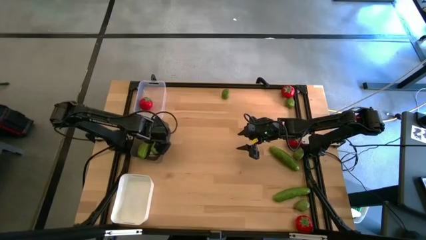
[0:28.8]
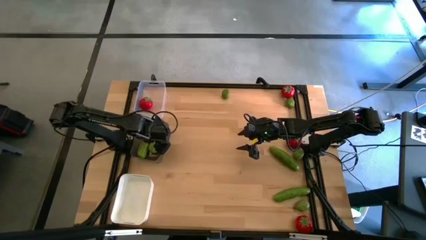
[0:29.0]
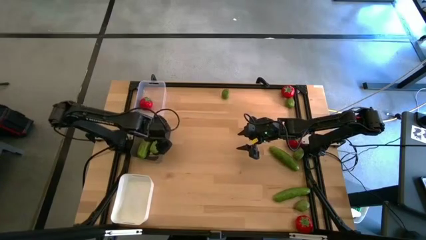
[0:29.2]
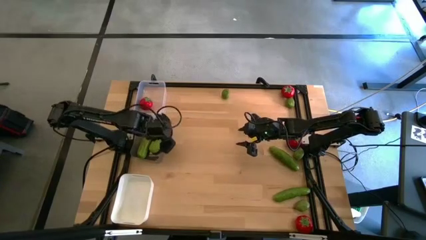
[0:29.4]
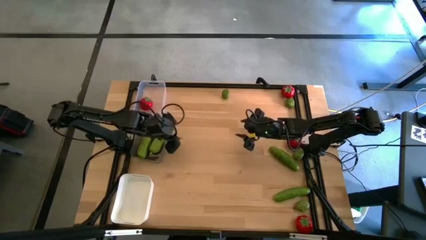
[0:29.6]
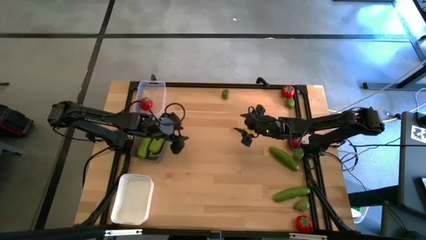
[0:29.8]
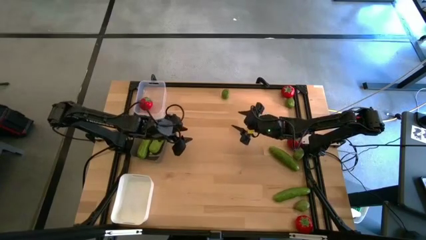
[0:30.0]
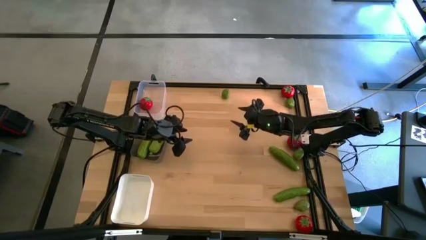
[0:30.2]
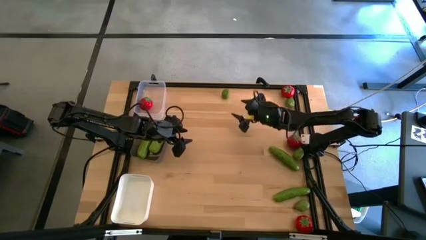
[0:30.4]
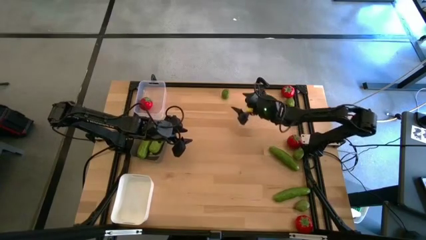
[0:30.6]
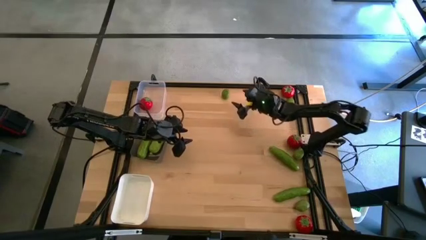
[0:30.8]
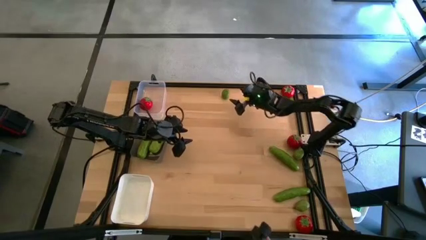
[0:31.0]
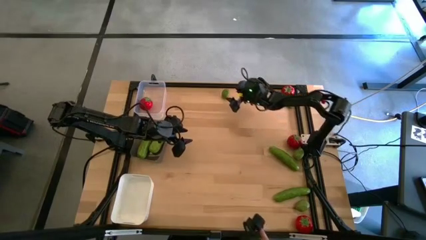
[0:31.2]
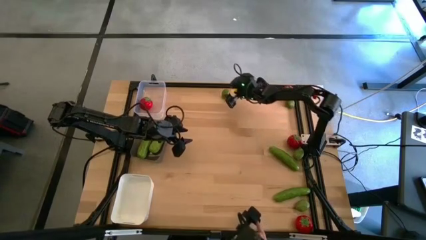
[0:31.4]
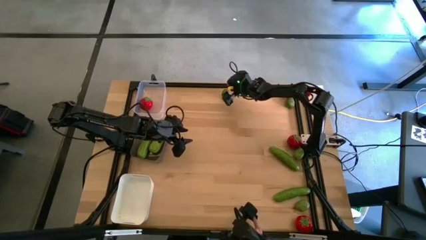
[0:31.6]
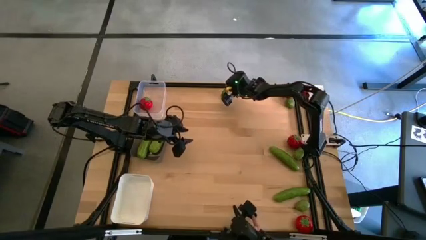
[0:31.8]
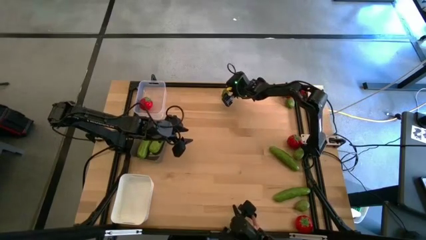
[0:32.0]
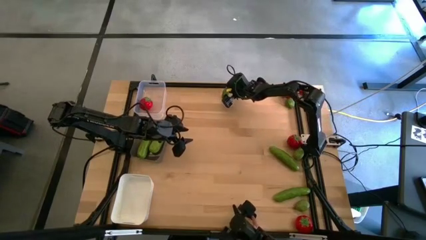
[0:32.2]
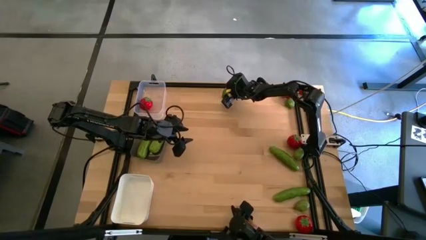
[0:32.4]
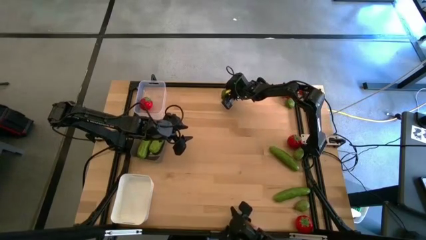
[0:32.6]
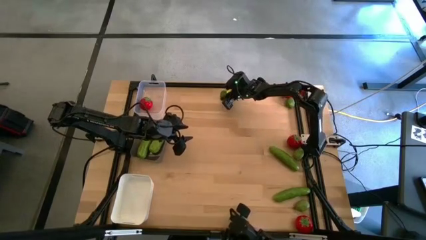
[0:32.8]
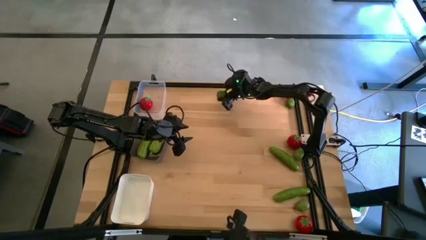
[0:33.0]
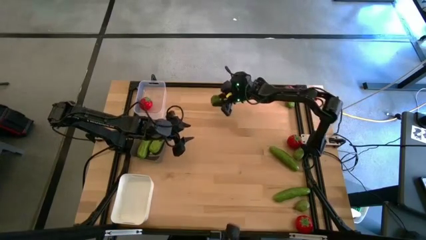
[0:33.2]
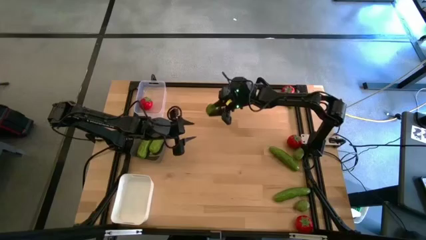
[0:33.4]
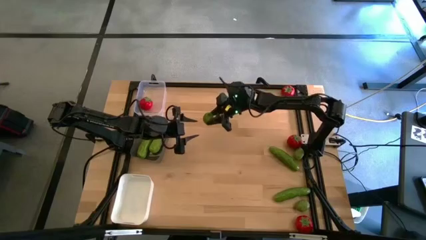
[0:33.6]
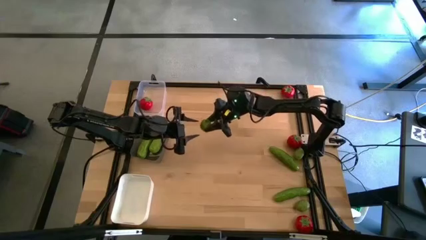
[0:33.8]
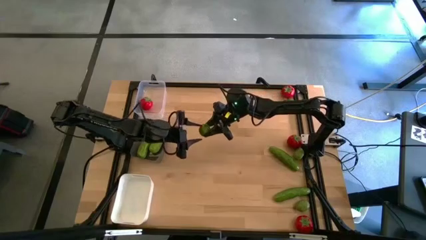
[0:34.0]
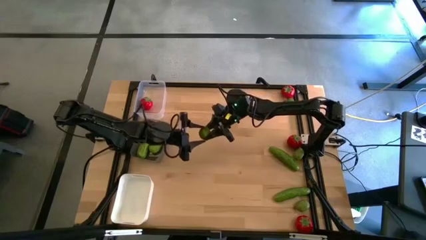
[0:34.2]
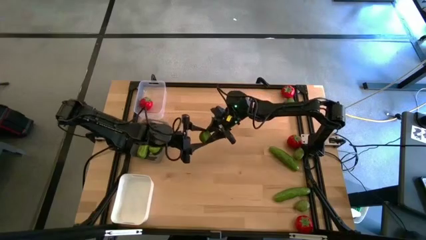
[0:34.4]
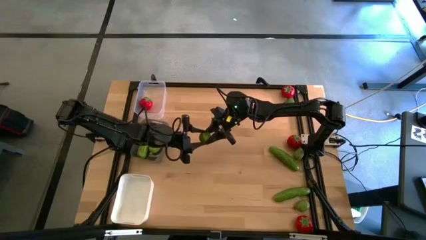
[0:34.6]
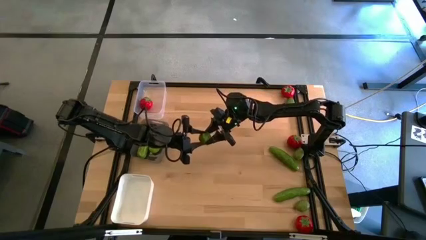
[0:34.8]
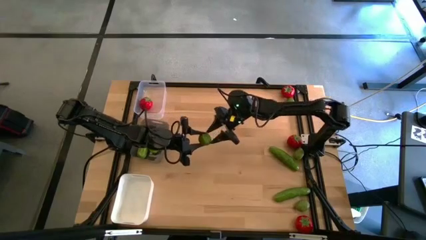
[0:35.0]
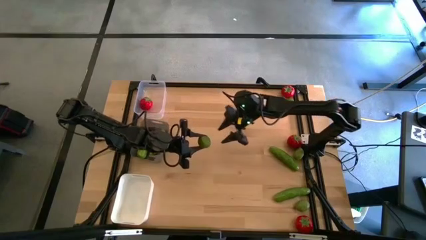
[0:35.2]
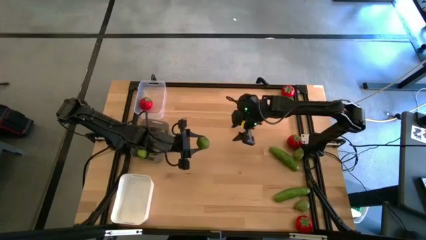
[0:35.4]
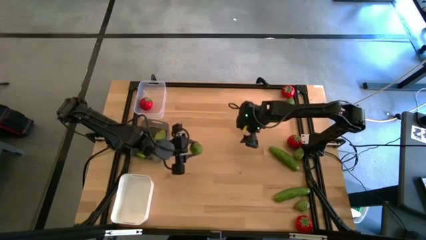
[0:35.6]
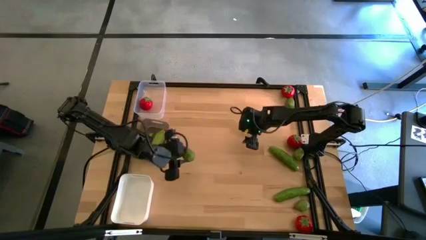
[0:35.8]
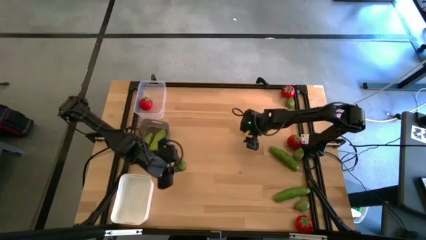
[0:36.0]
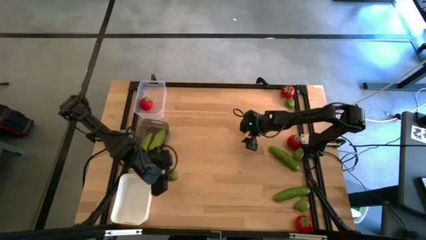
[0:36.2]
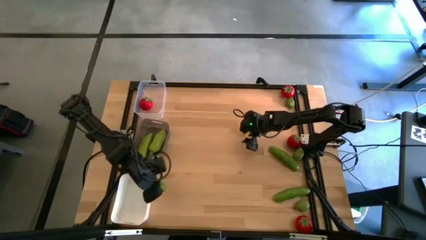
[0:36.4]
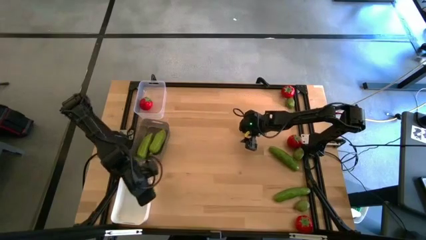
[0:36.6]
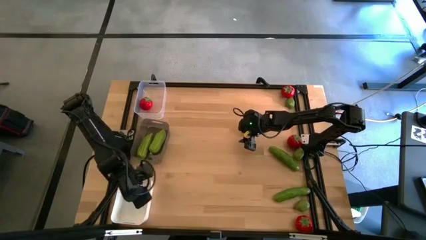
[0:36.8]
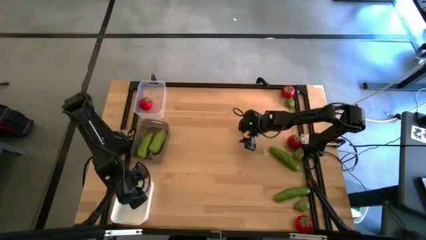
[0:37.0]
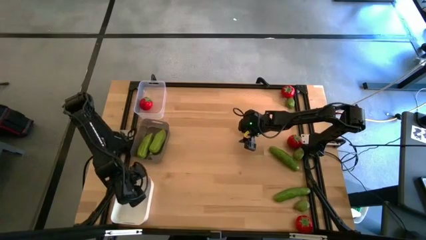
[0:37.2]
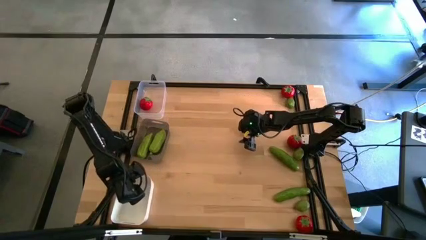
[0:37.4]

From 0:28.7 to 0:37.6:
Task: Sort produce into baskets
Put the top left lime into the white bin

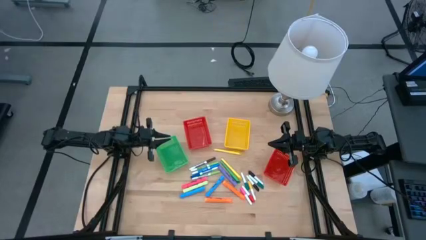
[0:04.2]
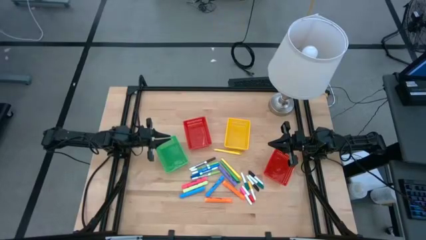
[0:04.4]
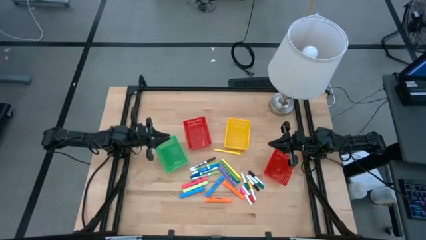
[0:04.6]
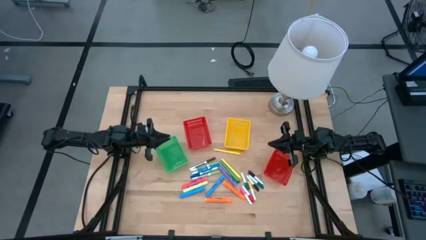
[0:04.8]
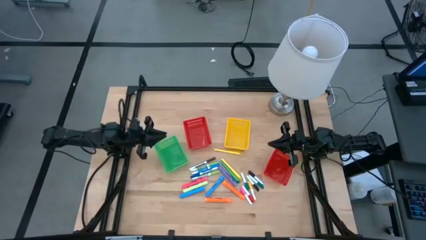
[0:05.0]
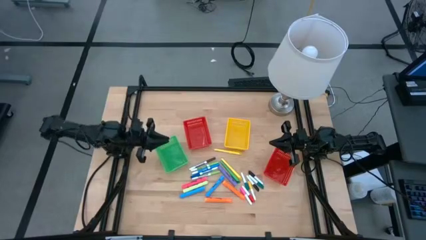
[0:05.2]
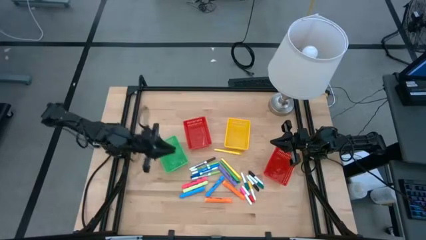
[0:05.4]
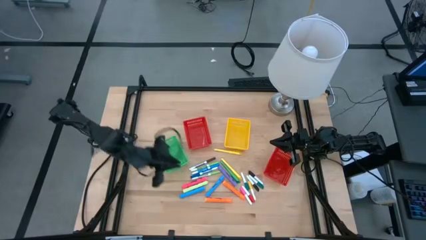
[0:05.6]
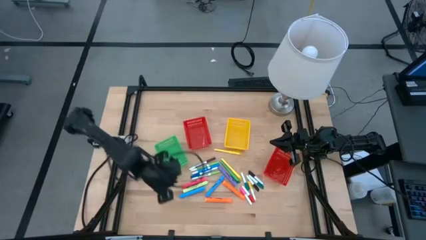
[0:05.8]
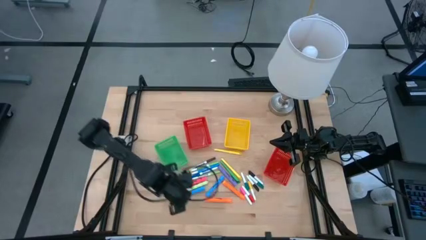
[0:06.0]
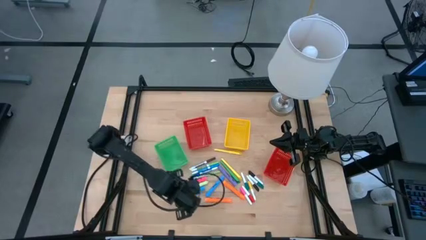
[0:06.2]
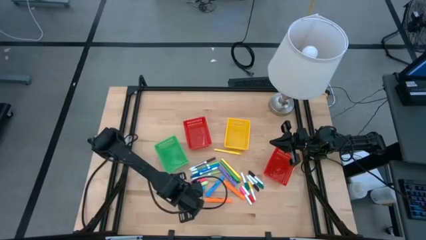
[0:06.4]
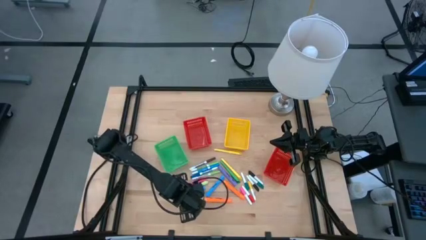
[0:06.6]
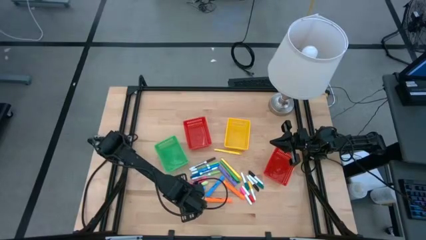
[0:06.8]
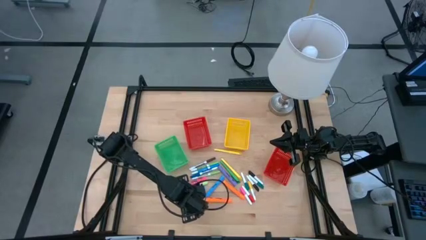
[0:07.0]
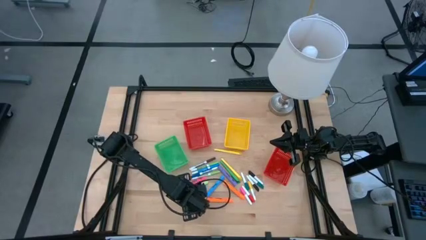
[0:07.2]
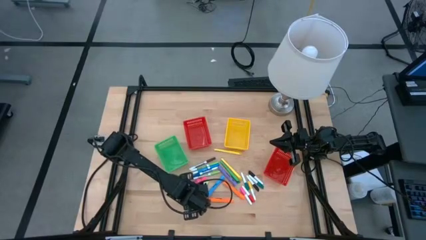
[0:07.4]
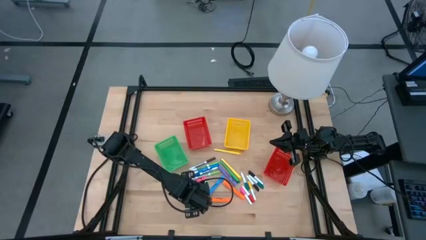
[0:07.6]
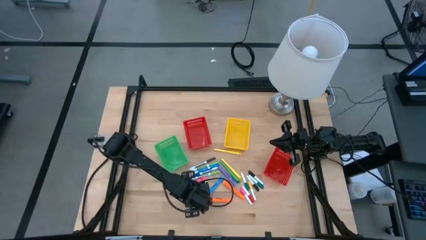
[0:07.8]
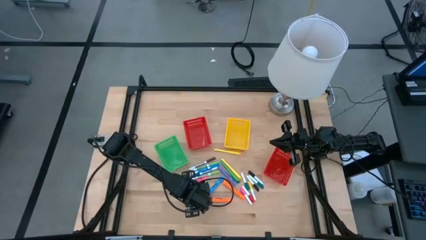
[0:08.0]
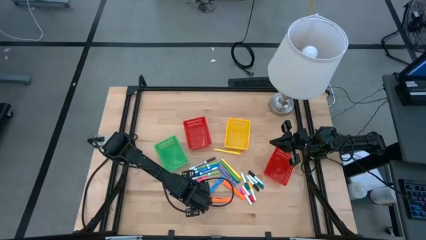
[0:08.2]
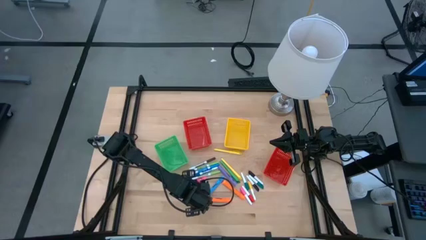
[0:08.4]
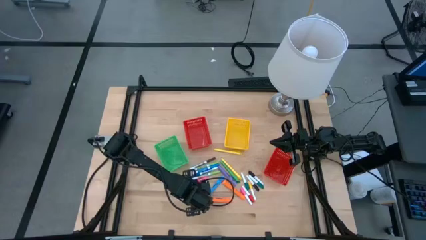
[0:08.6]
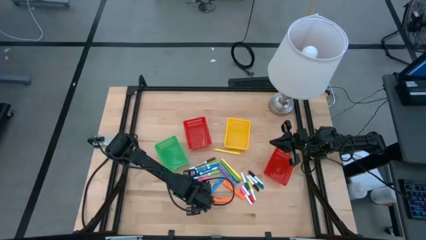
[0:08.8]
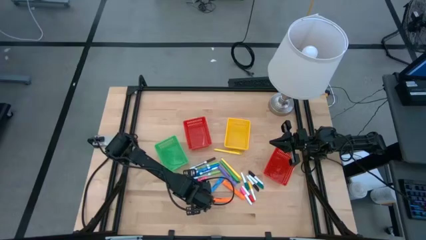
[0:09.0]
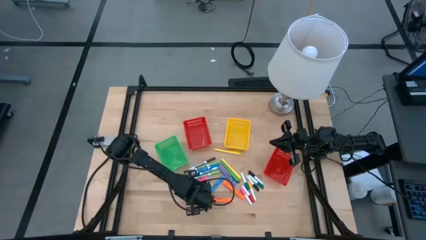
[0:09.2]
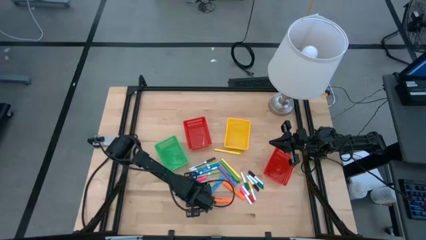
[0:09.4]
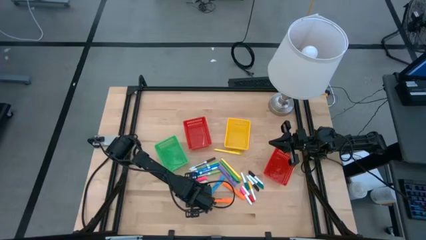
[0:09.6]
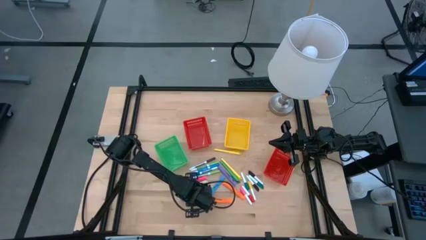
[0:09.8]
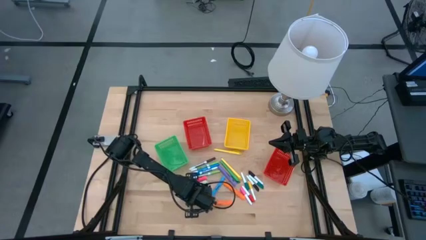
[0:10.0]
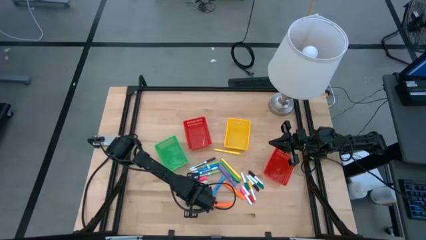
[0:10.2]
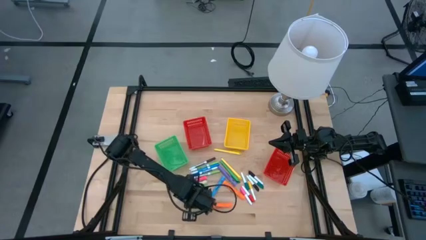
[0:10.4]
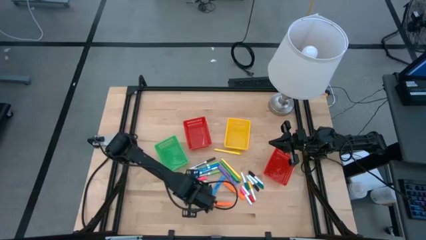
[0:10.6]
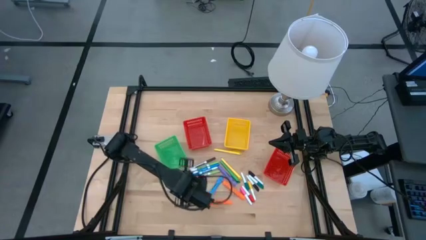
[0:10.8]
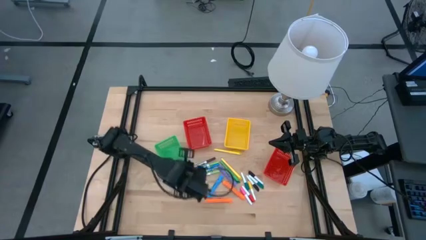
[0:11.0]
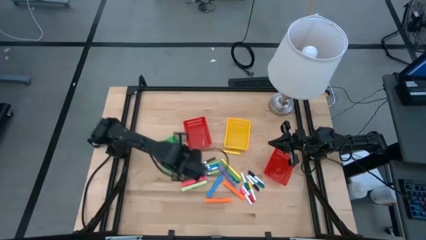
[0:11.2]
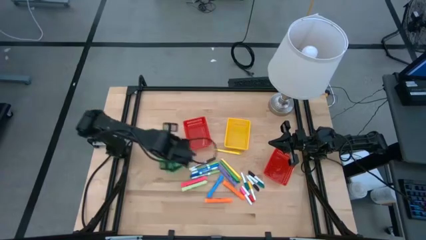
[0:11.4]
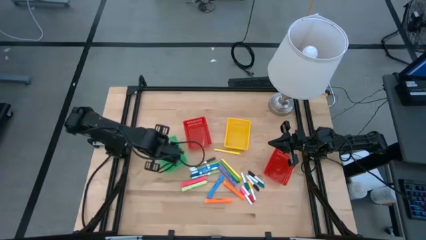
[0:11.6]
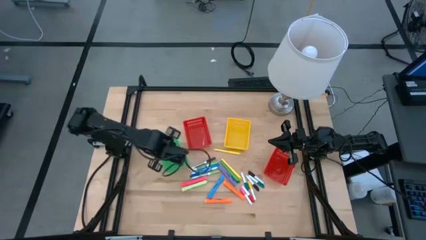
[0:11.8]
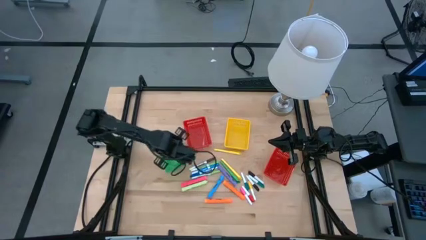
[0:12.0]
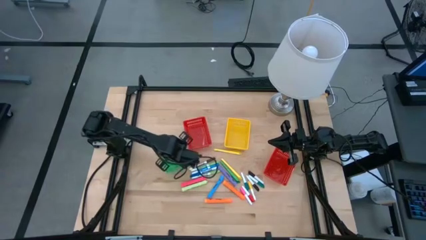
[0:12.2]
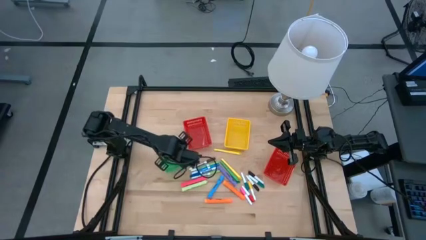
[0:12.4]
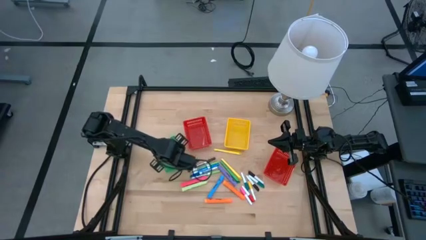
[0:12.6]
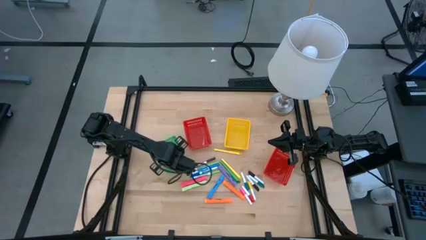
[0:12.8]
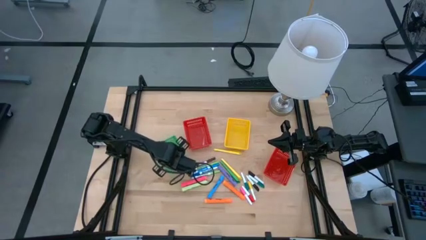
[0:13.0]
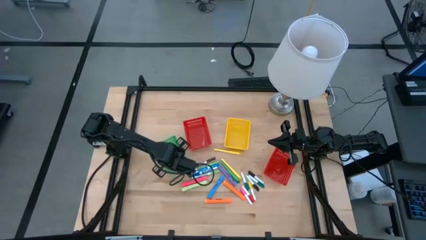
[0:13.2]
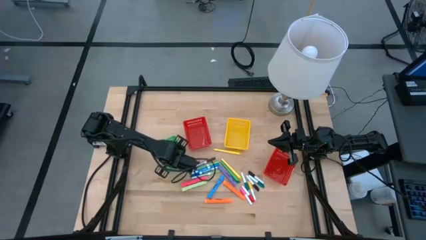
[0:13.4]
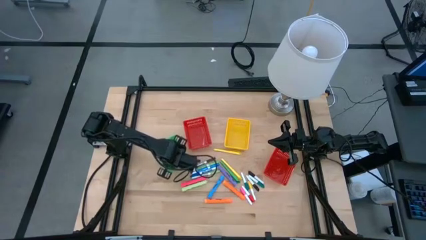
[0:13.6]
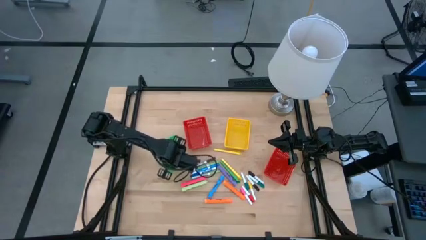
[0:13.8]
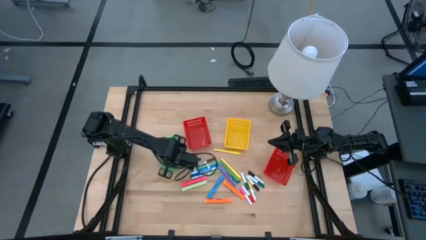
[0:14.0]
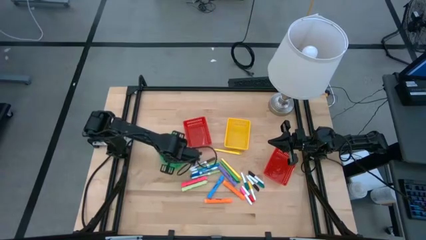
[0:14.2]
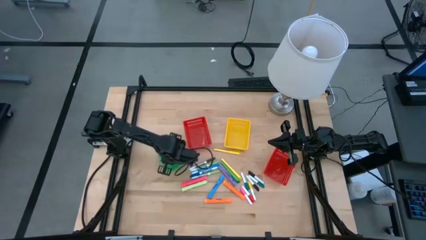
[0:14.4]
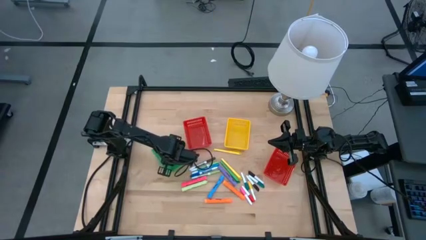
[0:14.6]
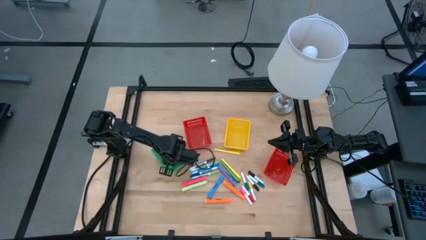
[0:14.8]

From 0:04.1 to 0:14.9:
Task: Pick & Place Markers
Put the left large blue highlighter pen into the green bin
